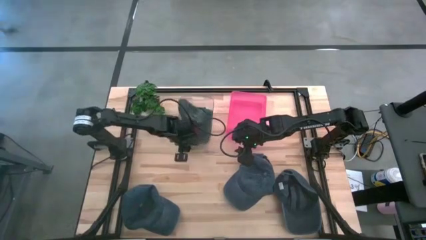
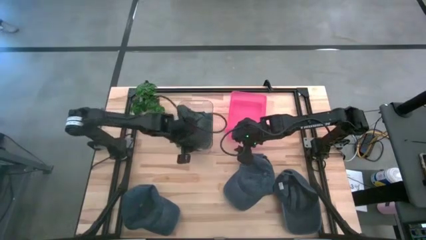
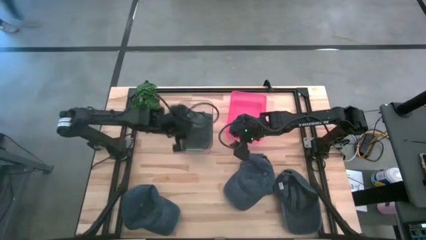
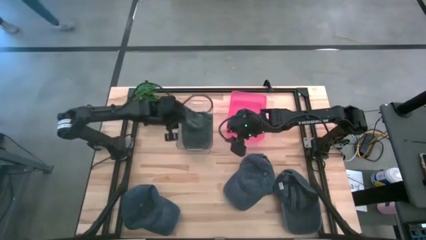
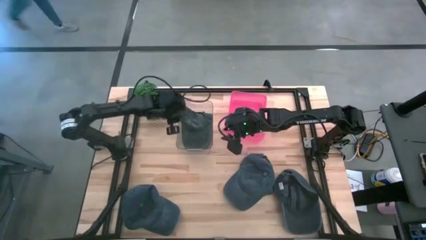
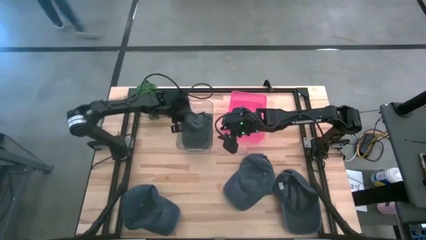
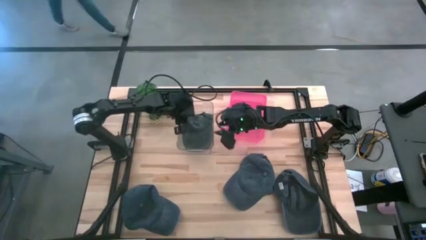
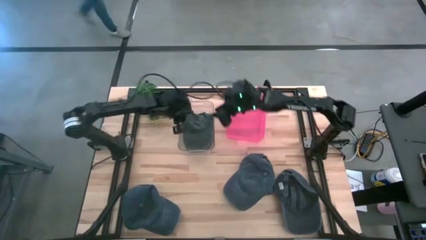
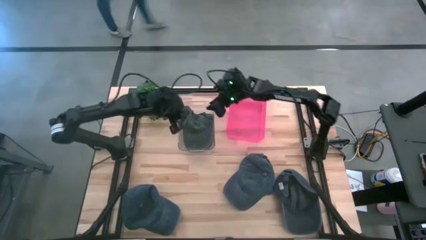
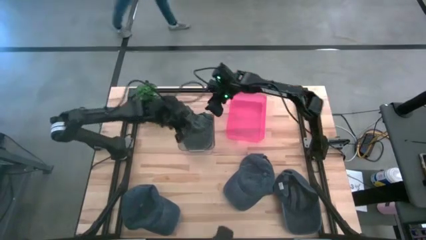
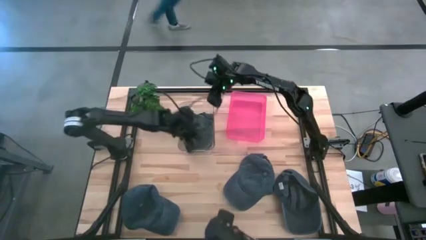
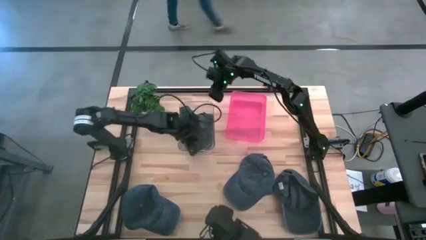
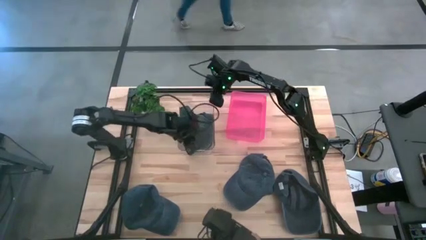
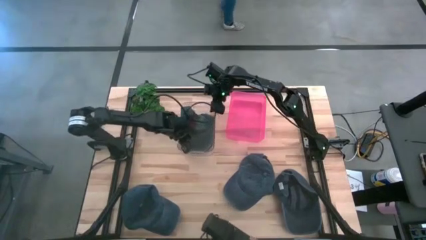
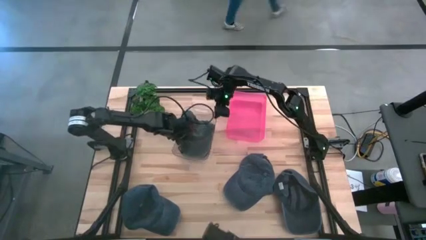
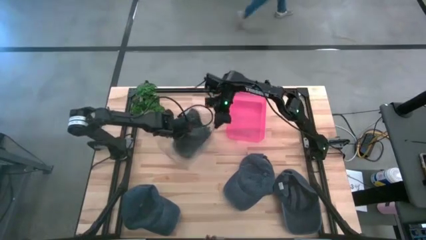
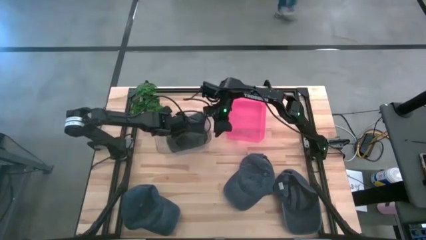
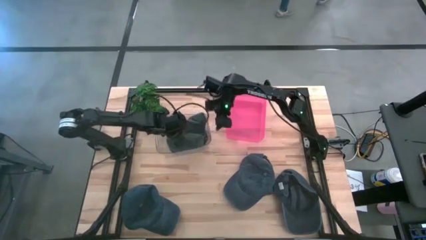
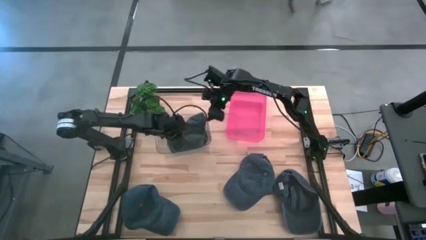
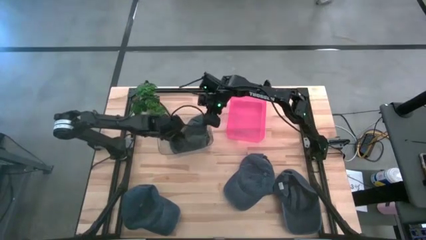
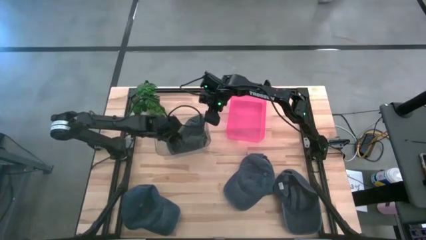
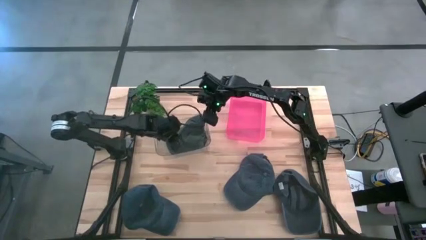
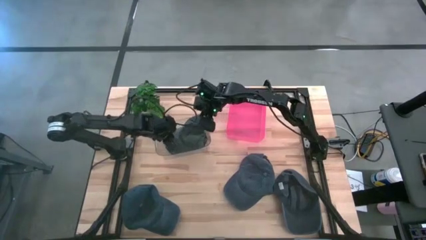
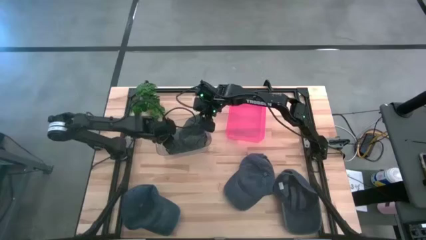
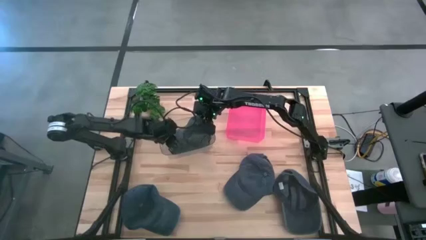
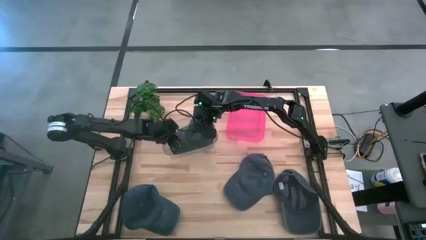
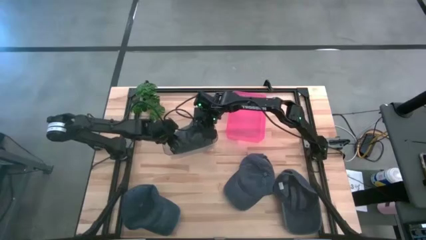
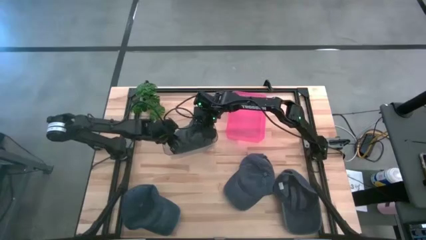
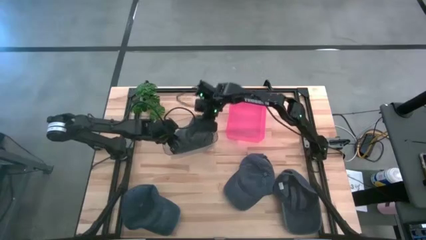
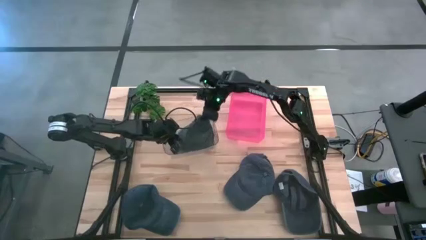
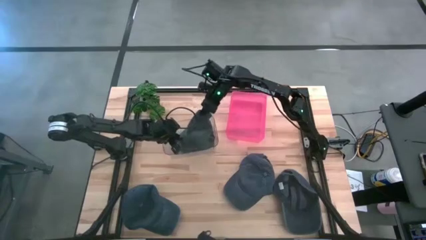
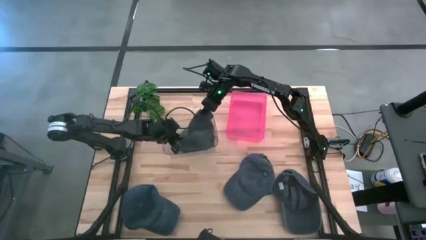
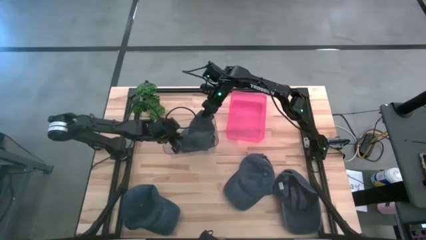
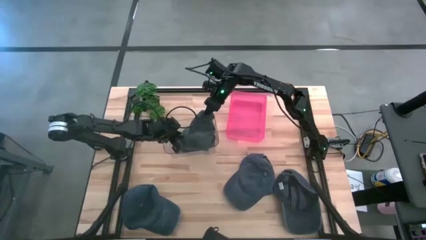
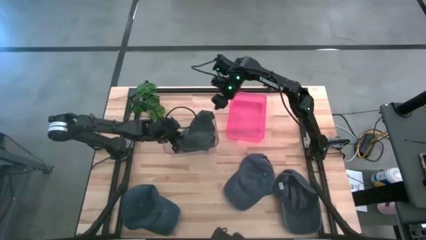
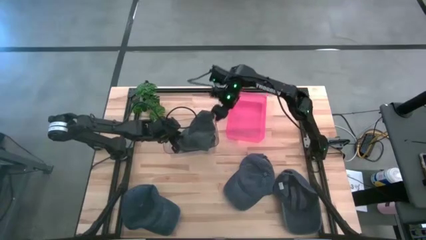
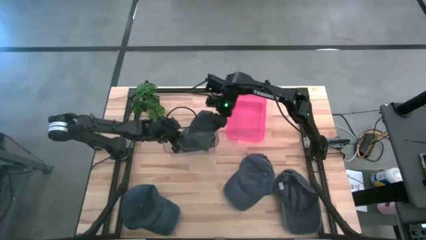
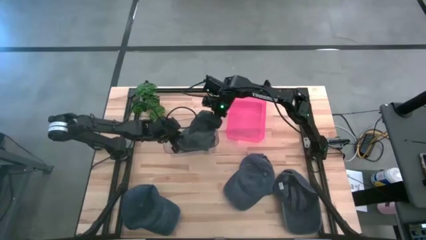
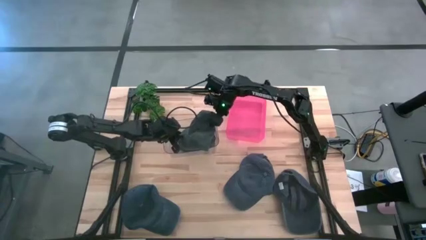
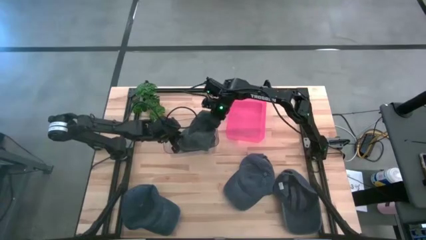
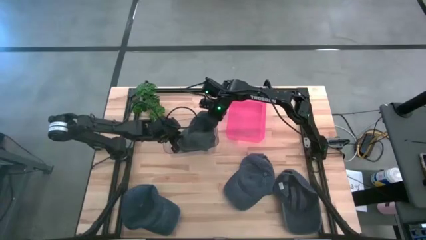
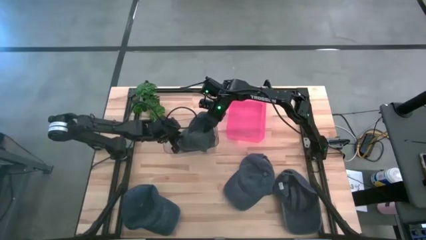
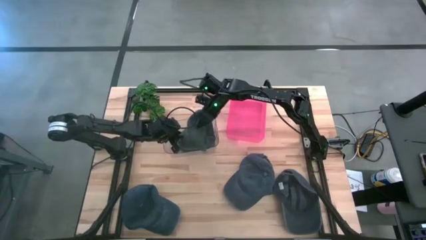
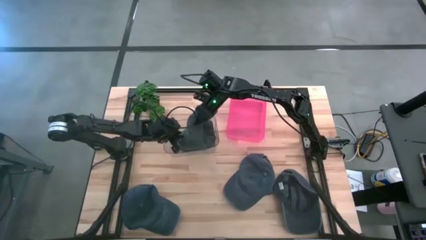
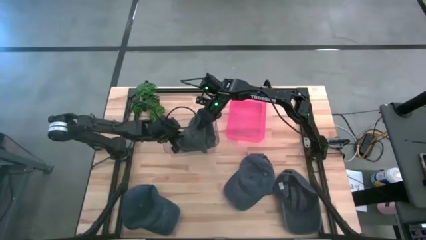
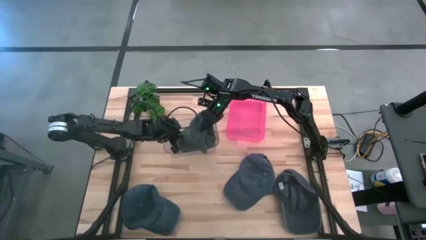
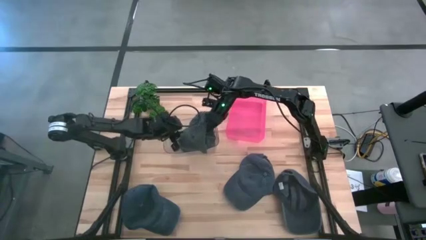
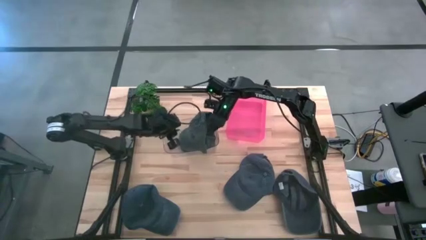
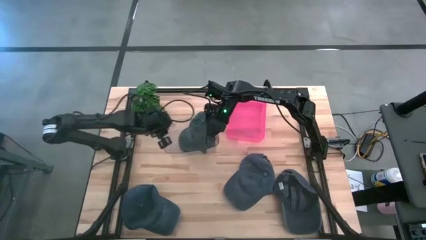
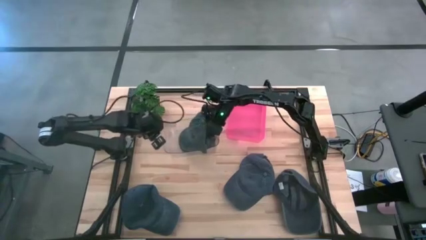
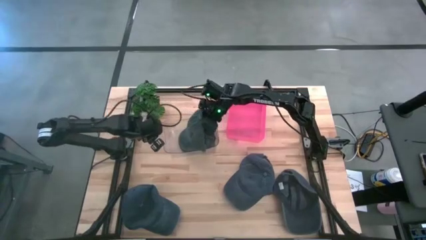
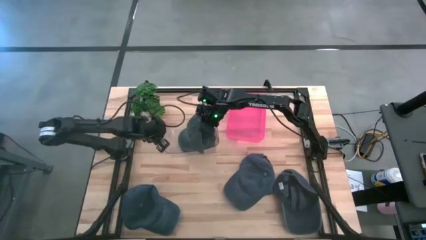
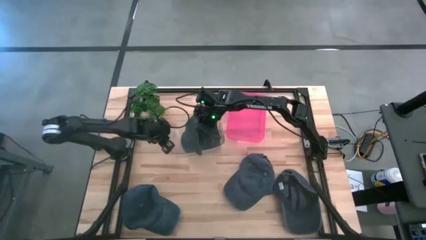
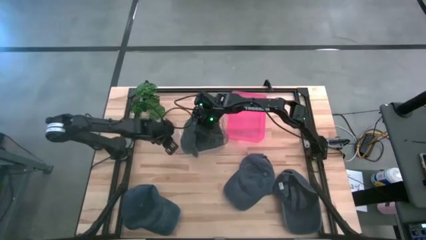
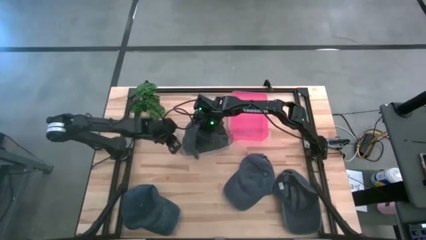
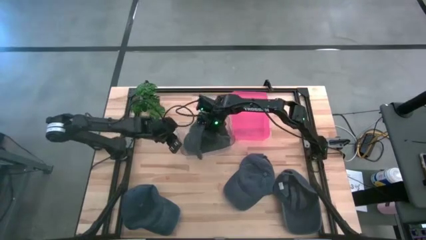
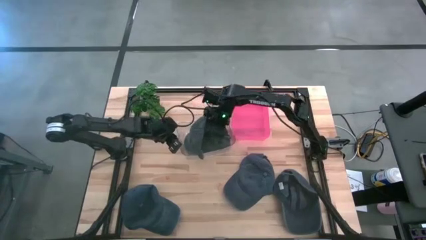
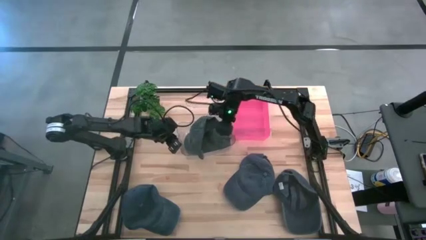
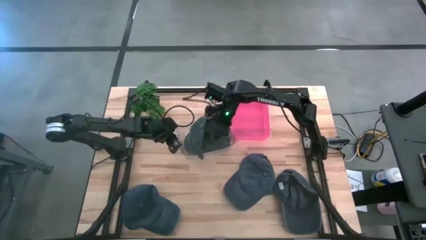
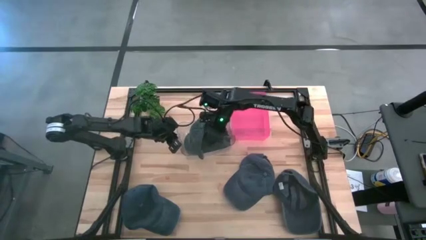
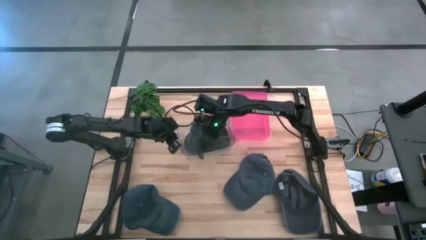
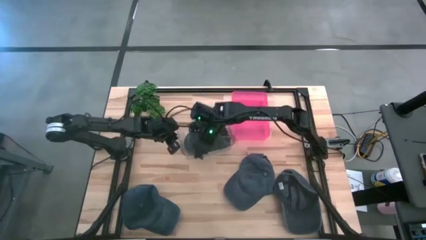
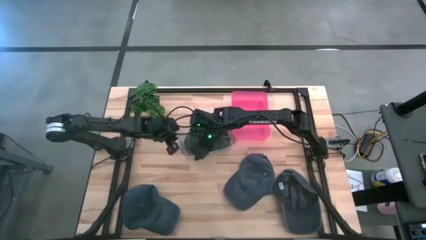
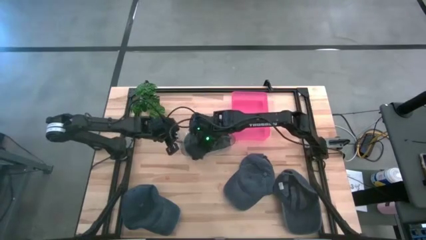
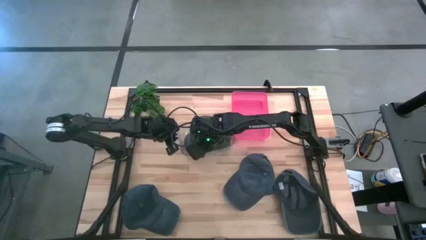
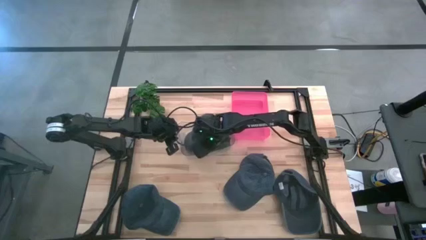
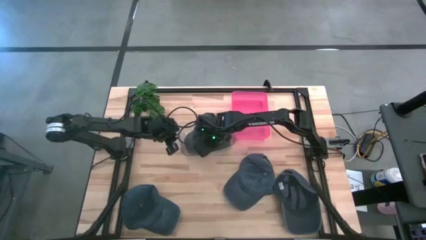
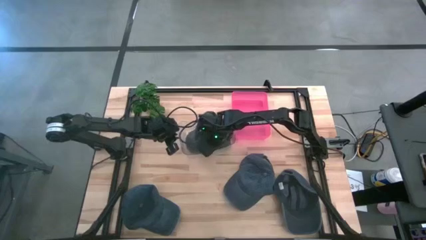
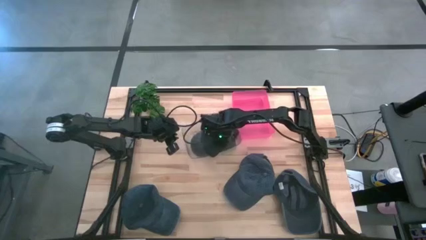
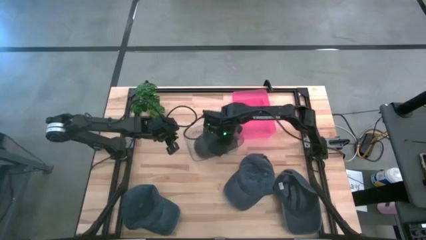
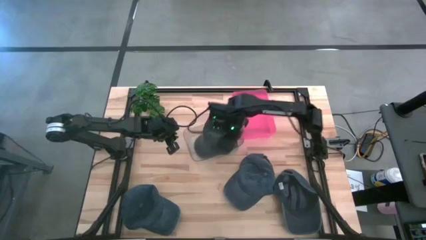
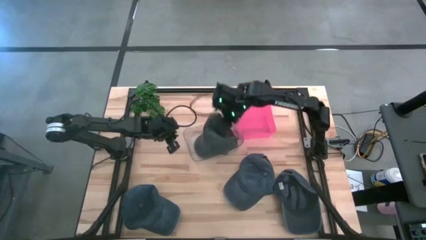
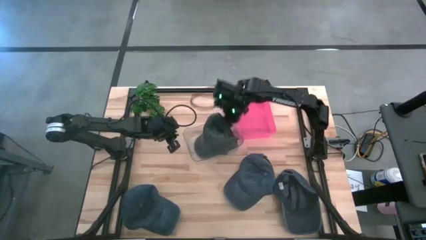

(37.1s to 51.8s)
Task: Pick & Place hat
Put the black cap into the transparent bin

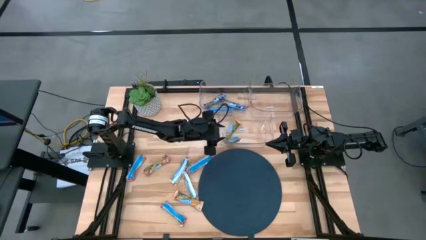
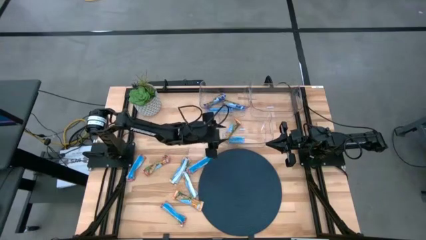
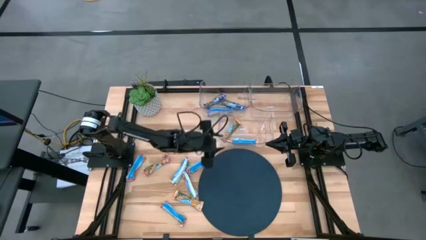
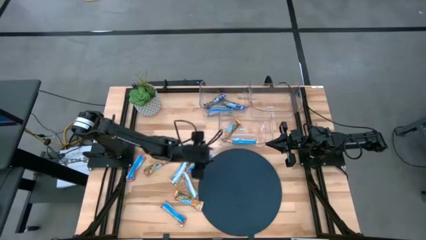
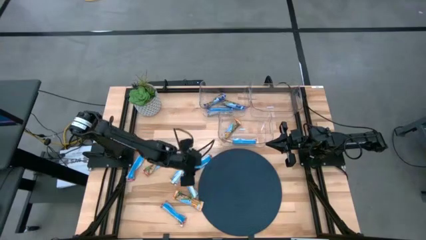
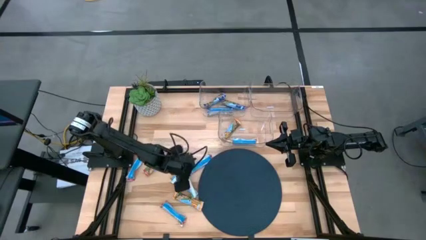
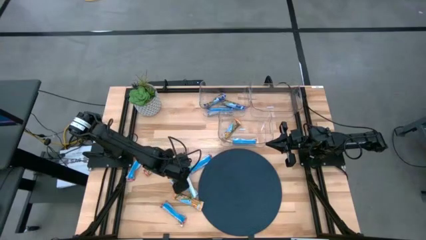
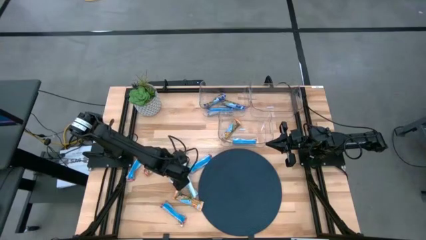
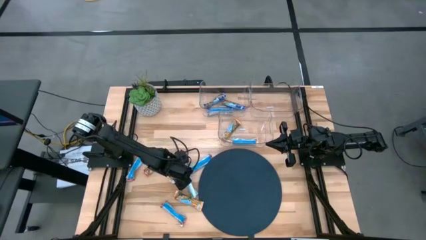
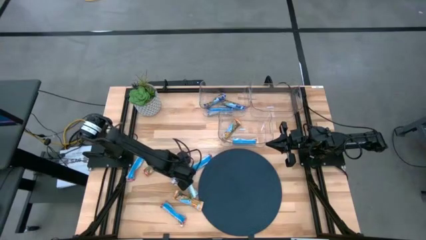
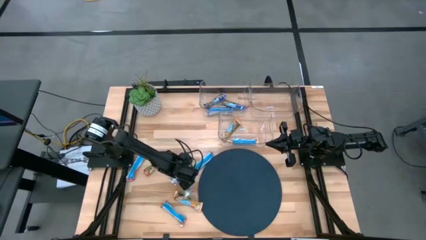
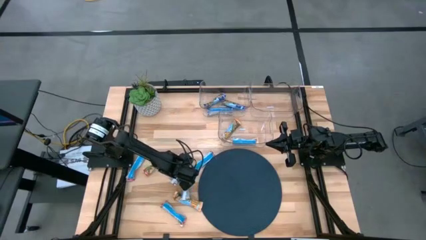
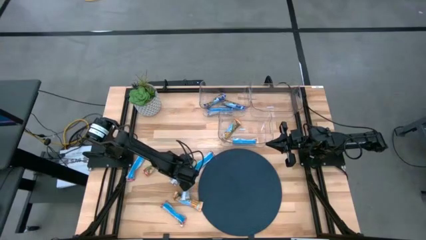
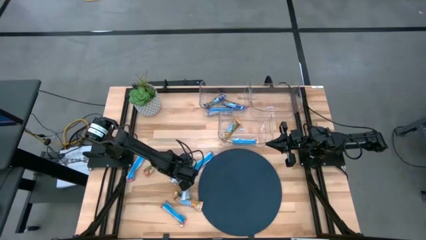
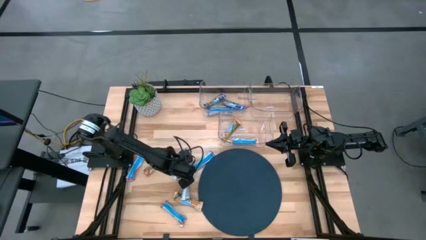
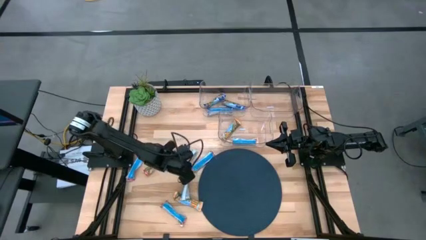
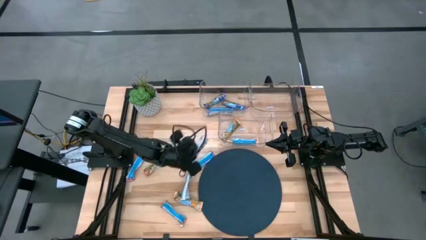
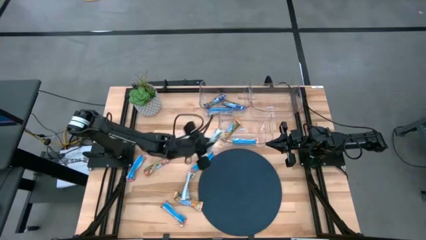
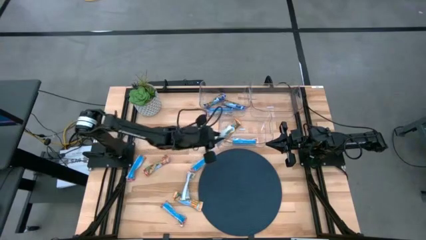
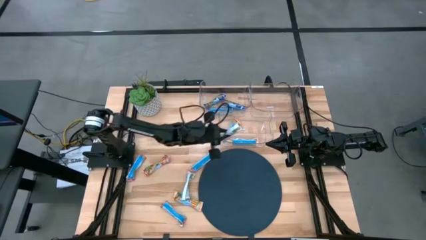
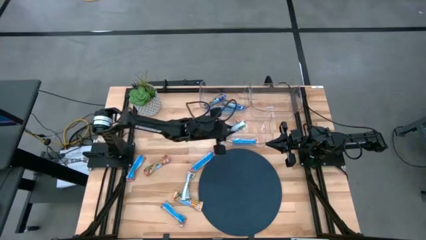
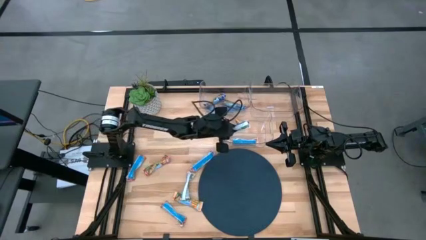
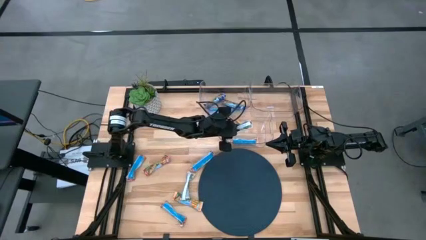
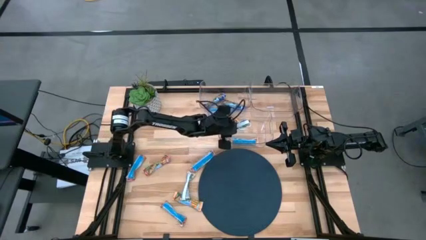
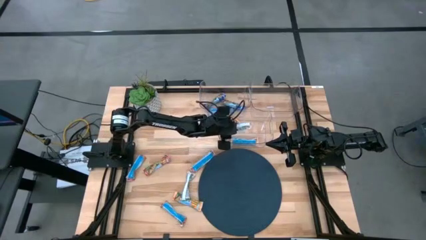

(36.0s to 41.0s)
Task: Pick and place Granola Bars by type
Put the yellow granola bar into the bottom transparent bin
